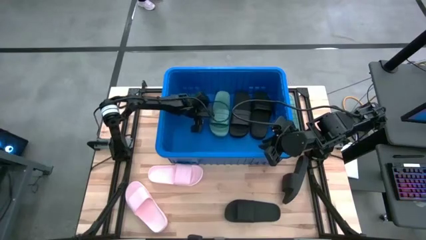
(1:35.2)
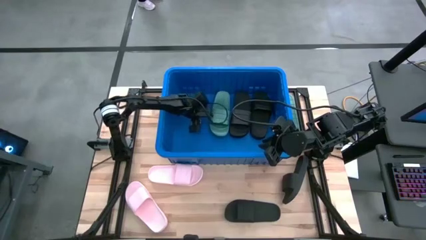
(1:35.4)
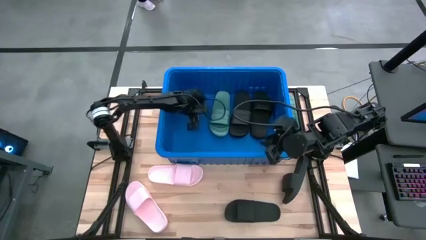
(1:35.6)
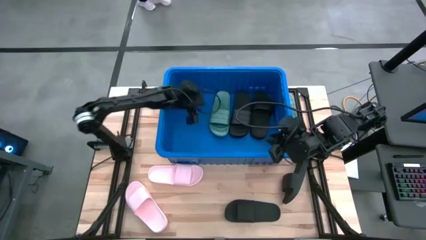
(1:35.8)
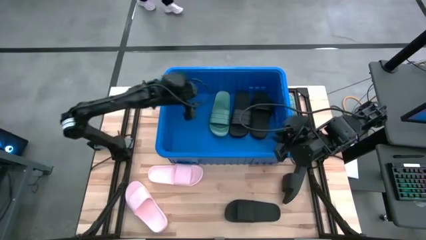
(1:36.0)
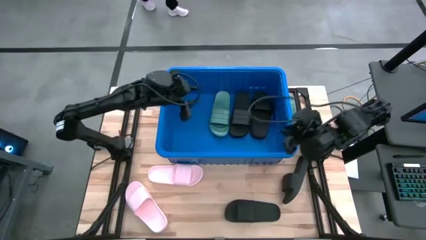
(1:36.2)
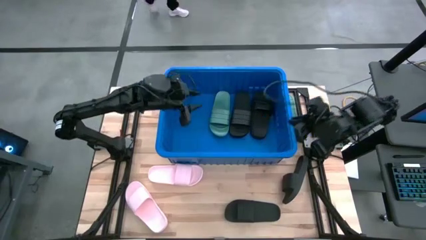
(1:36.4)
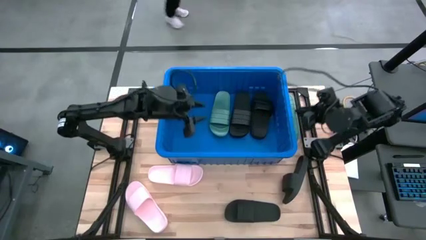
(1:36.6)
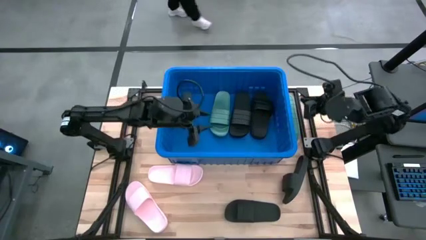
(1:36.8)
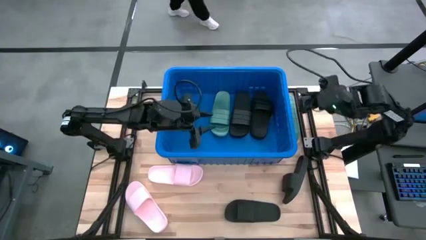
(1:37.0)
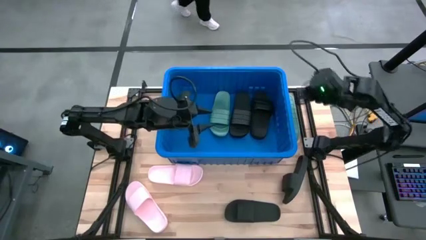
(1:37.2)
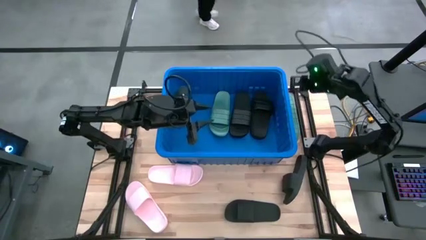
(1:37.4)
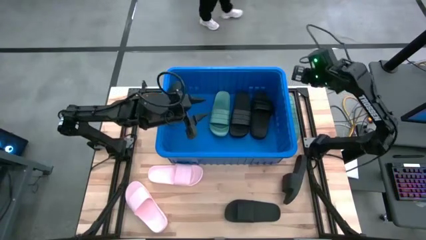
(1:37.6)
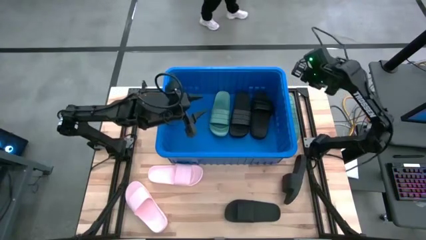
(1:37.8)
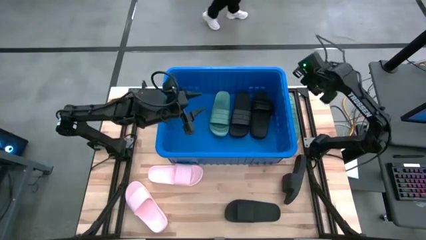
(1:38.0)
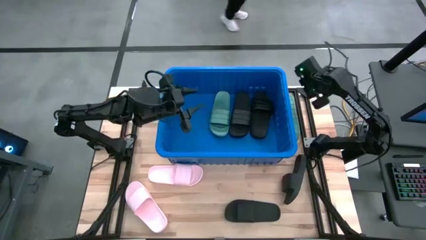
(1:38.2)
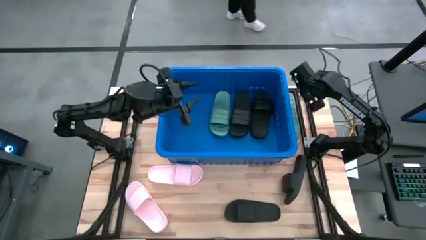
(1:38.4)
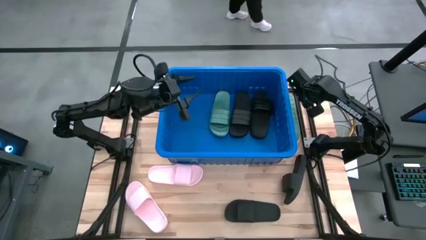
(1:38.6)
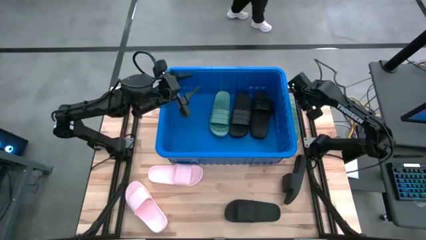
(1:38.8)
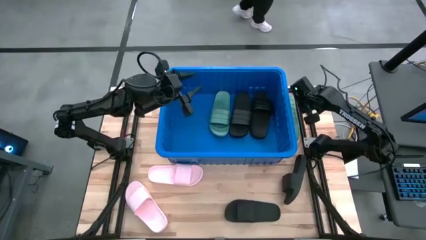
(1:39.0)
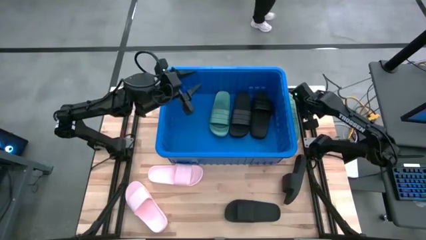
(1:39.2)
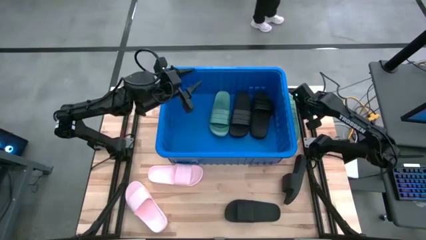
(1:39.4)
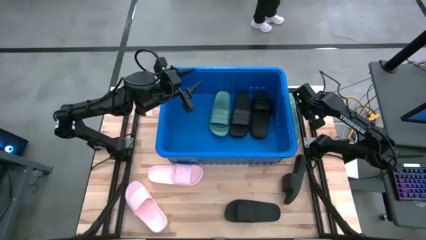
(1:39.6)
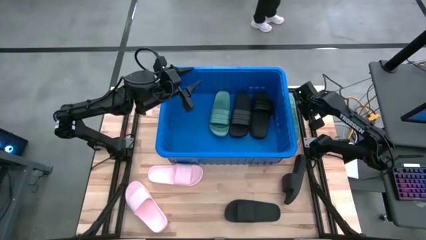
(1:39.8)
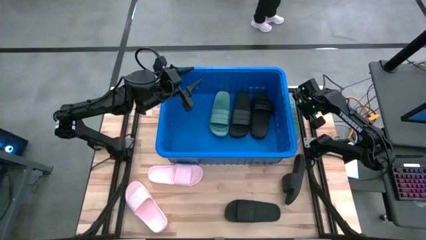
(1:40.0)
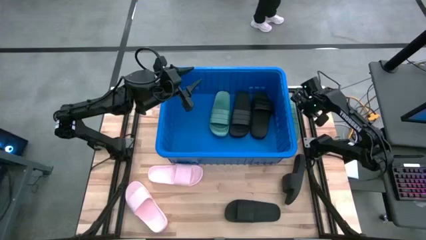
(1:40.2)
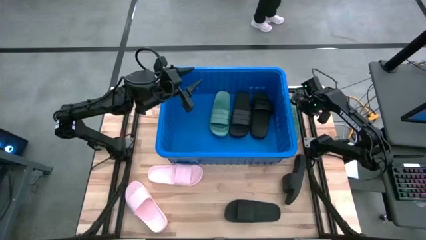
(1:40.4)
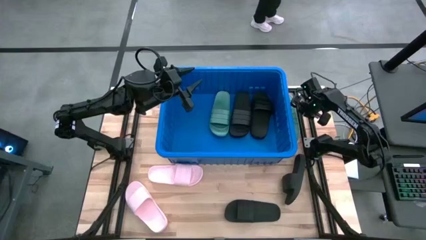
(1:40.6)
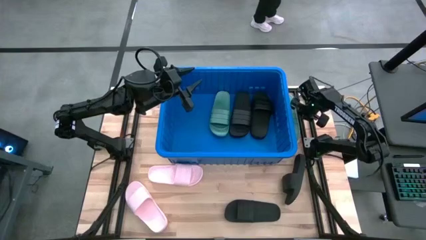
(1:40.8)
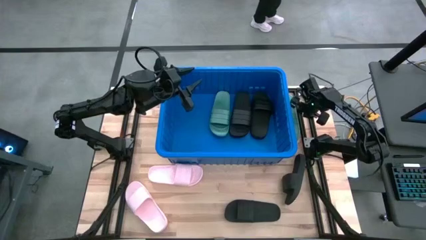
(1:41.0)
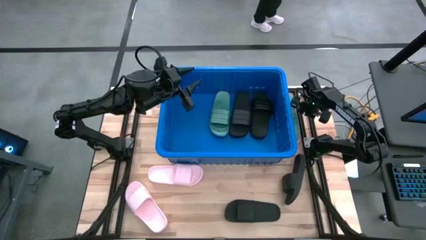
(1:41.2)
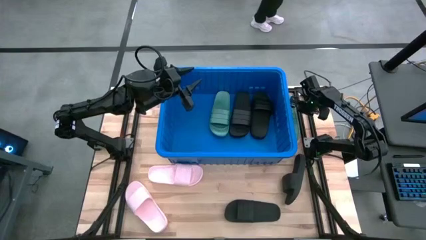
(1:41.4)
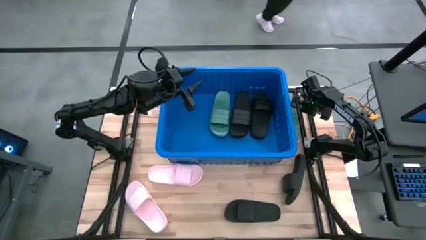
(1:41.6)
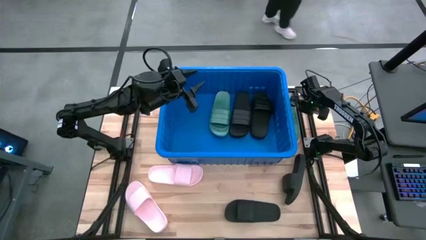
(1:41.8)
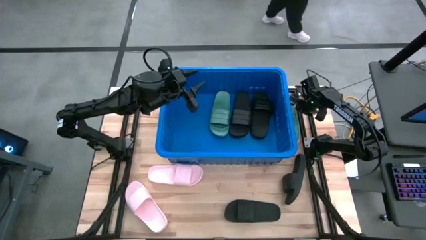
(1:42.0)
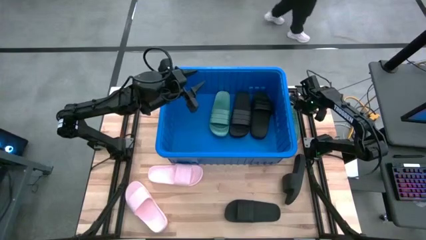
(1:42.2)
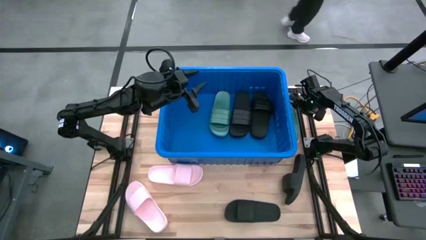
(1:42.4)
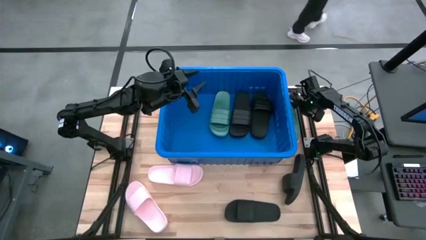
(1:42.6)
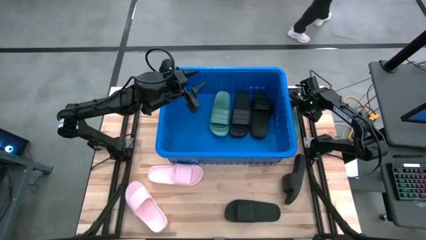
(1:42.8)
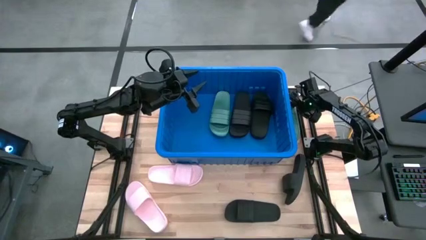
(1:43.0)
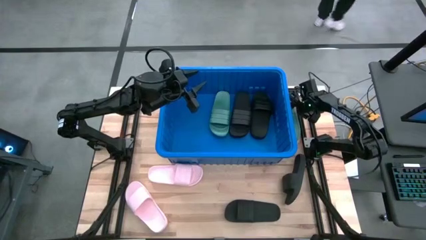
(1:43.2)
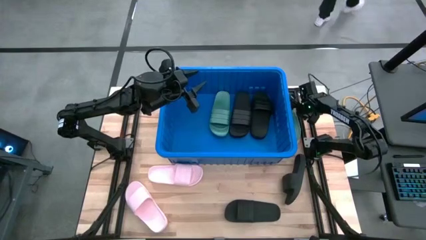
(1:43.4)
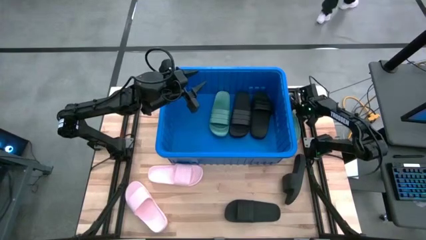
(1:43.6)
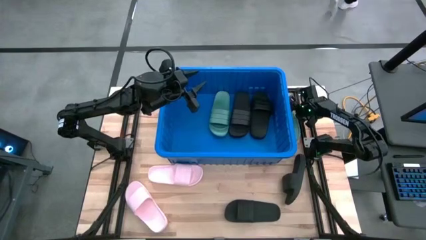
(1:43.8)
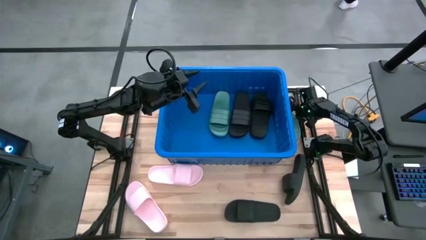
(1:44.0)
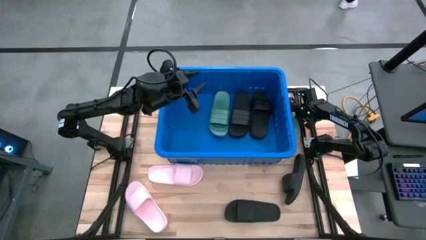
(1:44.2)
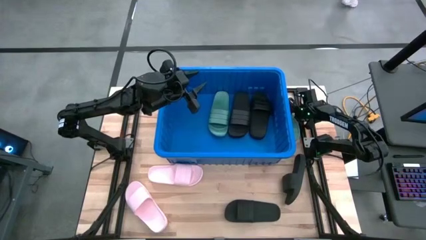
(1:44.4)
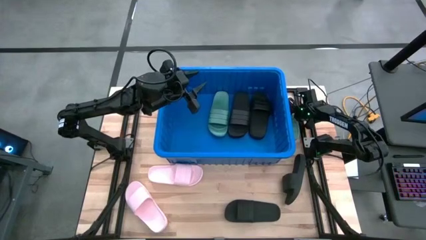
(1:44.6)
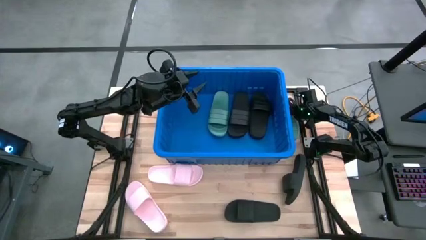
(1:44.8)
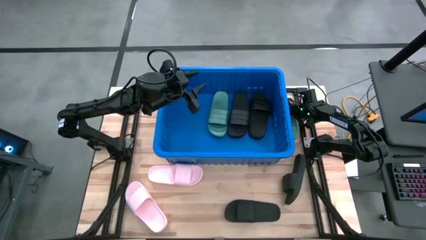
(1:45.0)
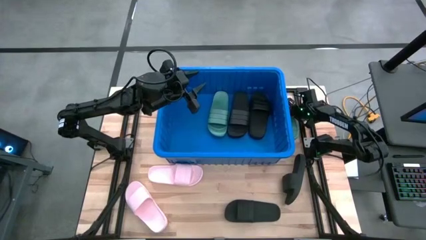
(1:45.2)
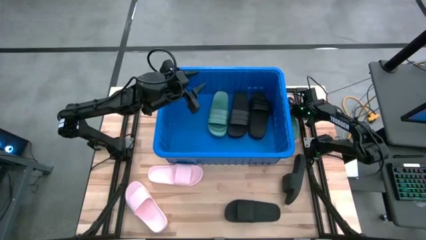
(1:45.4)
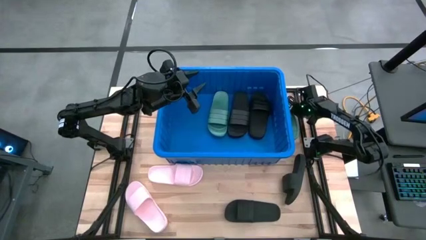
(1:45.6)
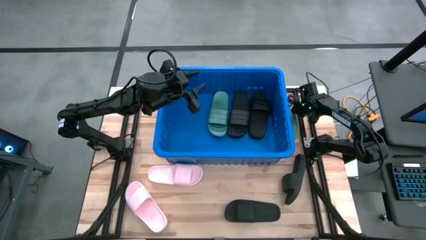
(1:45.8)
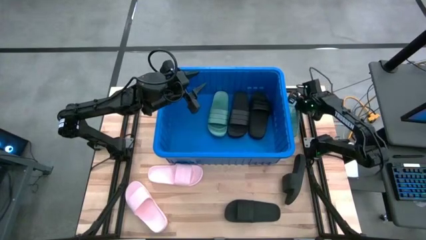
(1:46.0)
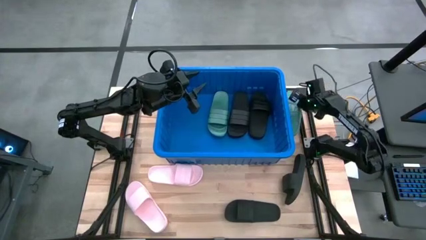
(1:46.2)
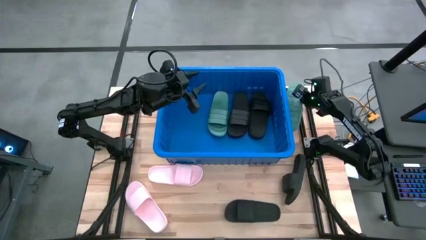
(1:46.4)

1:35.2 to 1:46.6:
Task: Pick and place slides into bin
Put the green slipper into the blue bin
